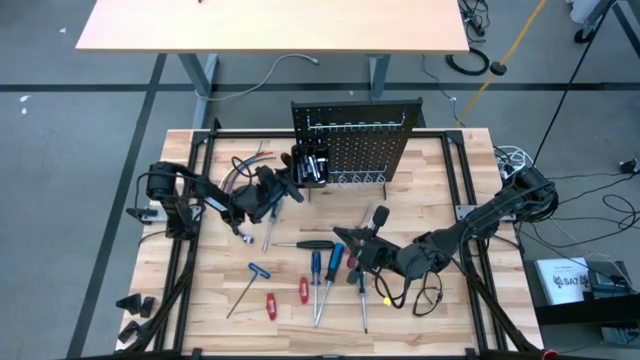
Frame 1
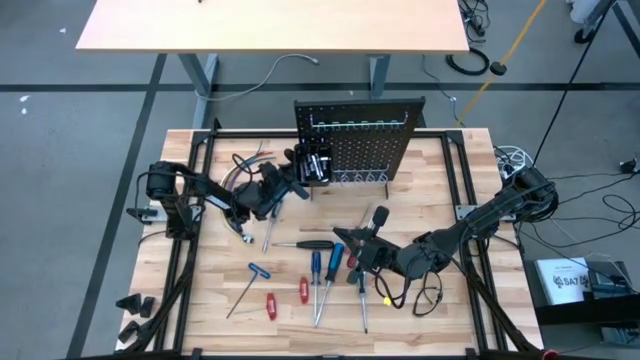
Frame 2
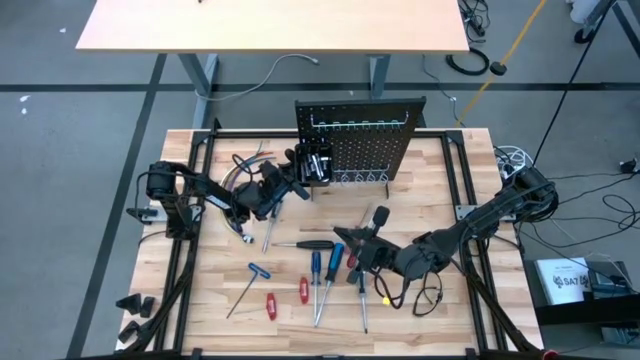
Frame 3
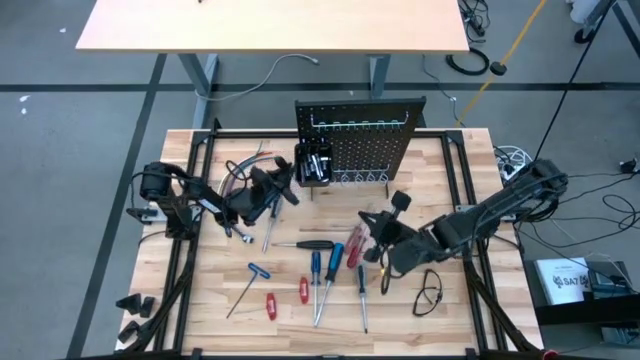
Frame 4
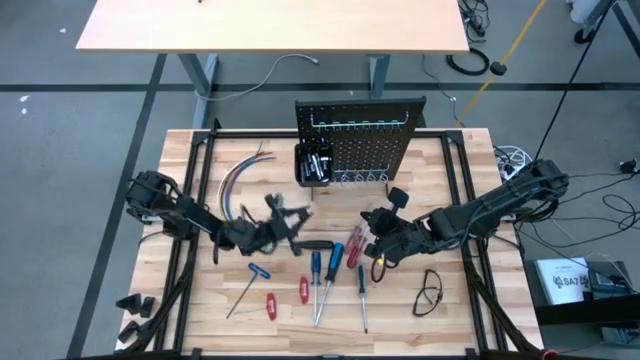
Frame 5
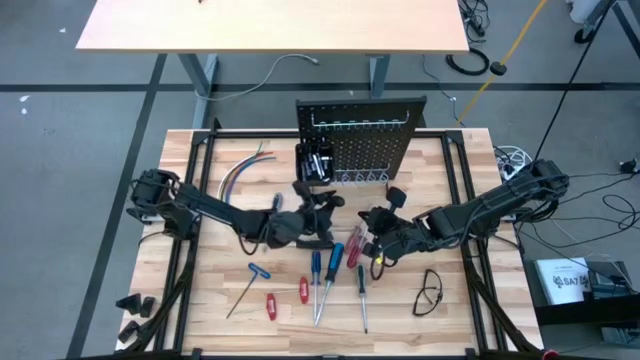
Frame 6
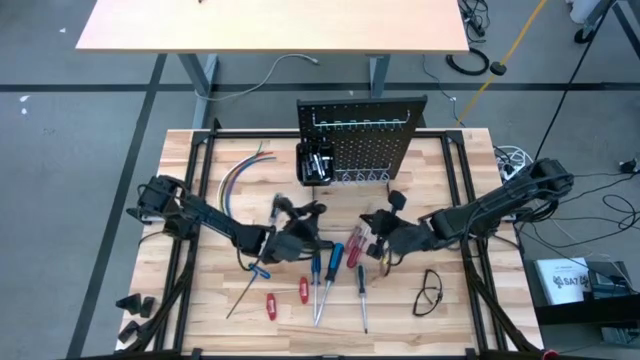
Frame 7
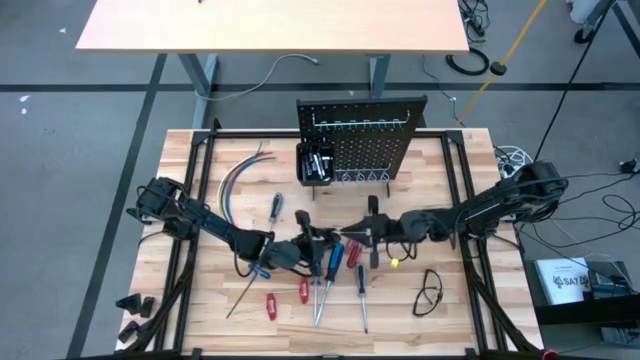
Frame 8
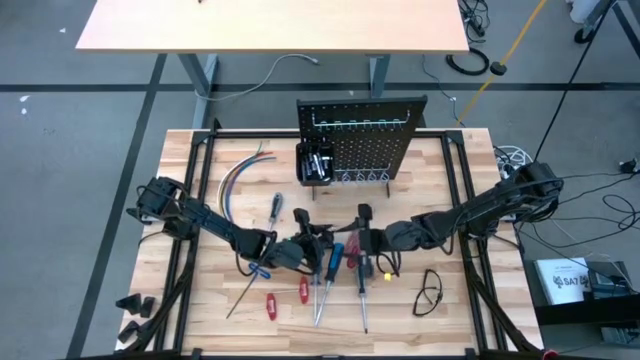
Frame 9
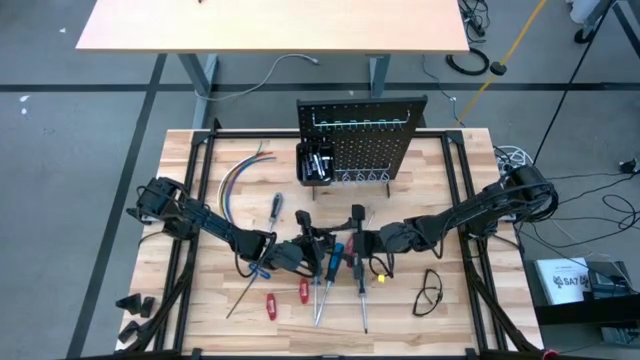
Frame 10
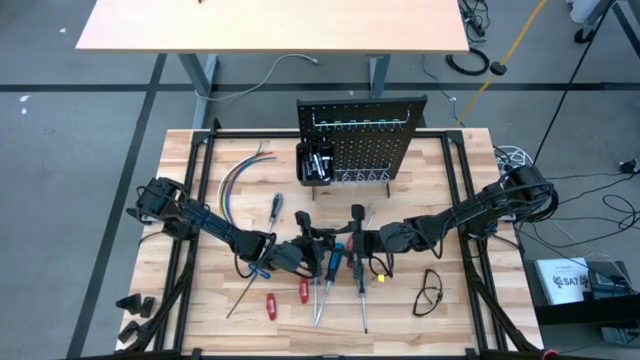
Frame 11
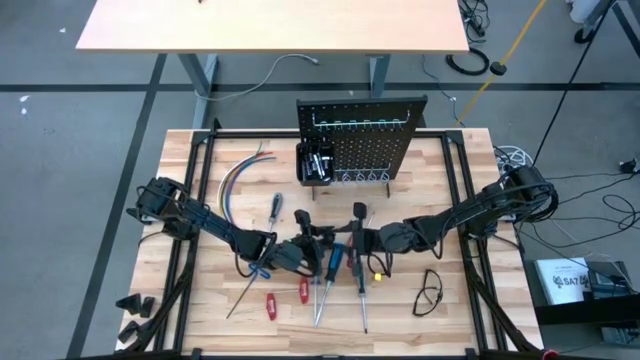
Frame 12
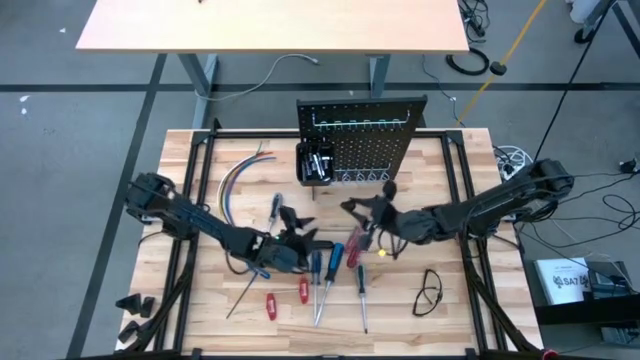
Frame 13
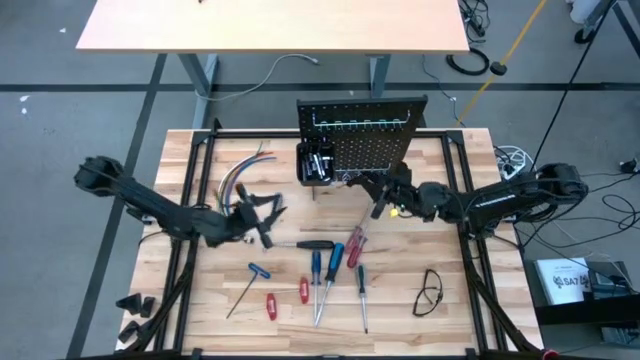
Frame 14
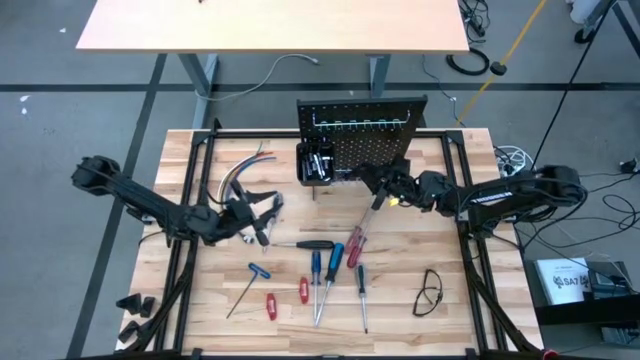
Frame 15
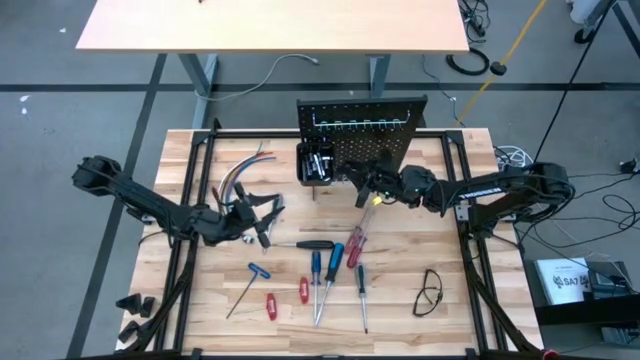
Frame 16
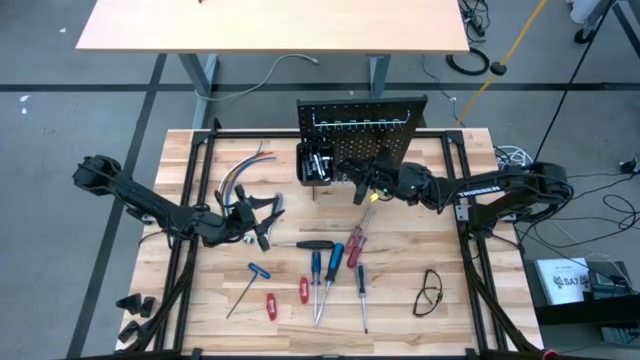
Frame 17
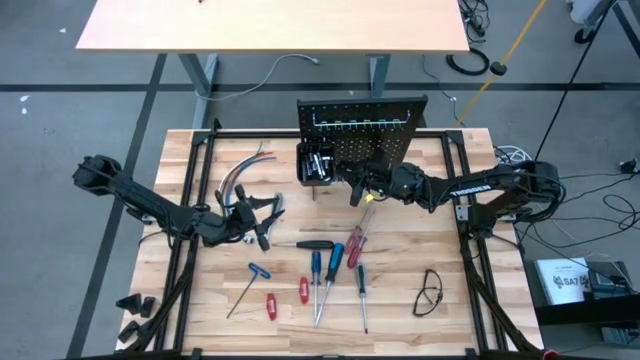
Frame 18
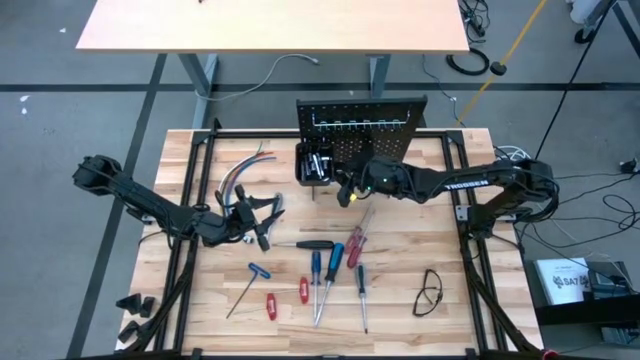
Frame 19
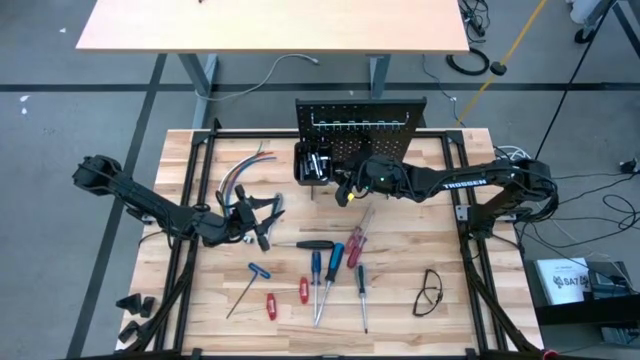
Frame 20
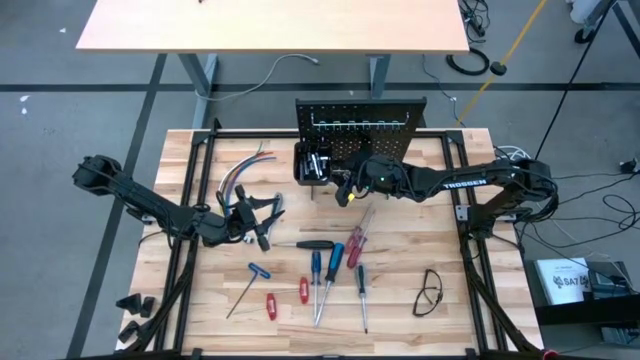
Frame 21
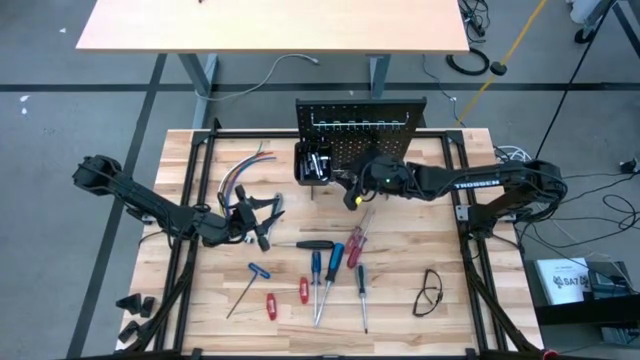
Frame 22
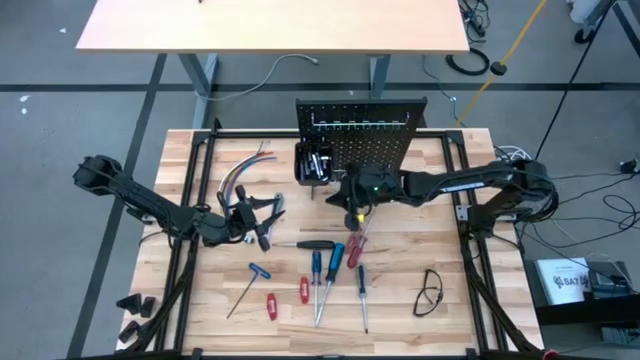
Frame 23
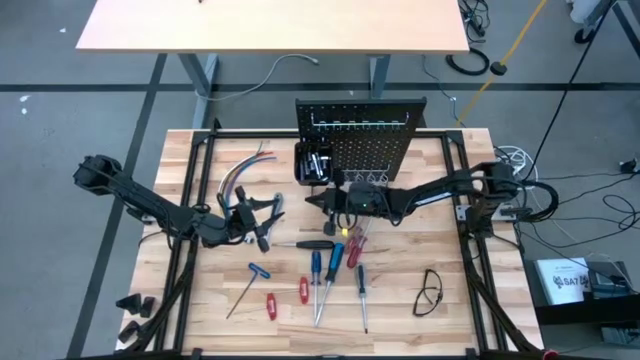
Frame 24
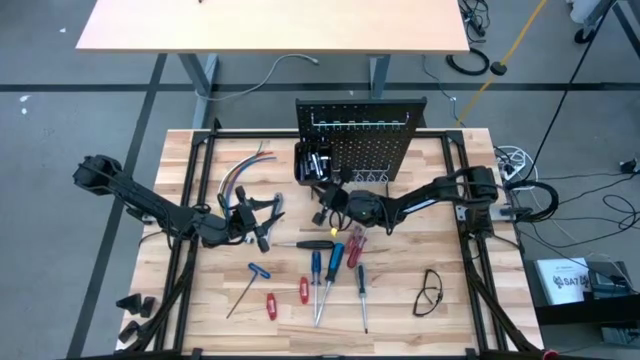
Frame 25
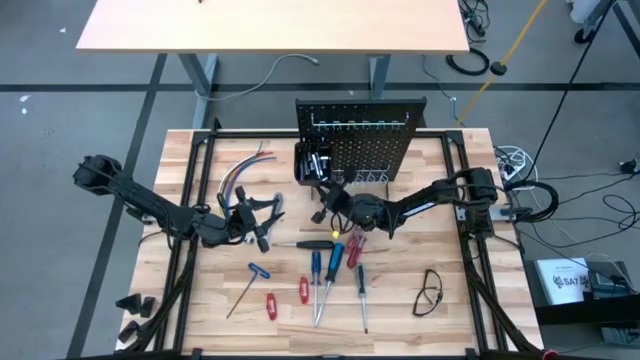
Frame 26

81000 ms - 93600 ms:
Task: Hang tools onto peg board
Hang the black screwdriver on the peg board

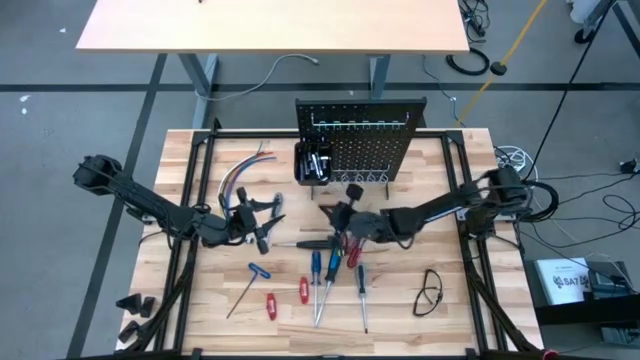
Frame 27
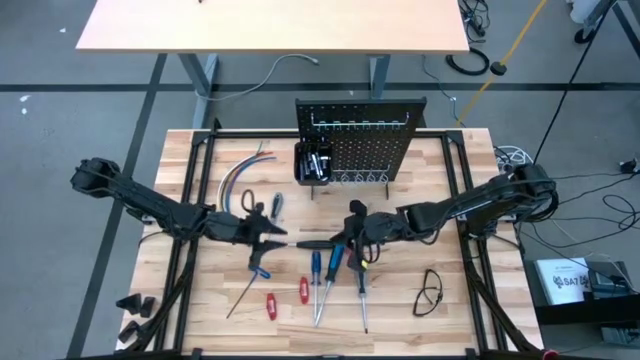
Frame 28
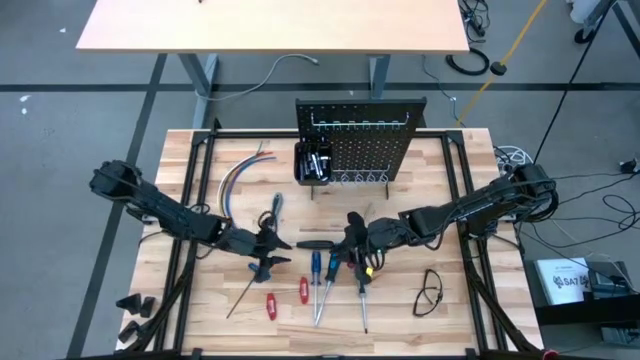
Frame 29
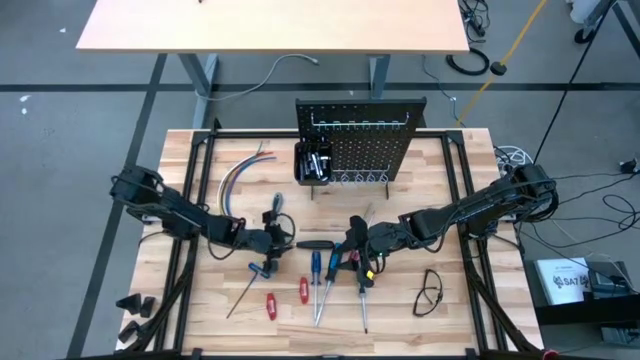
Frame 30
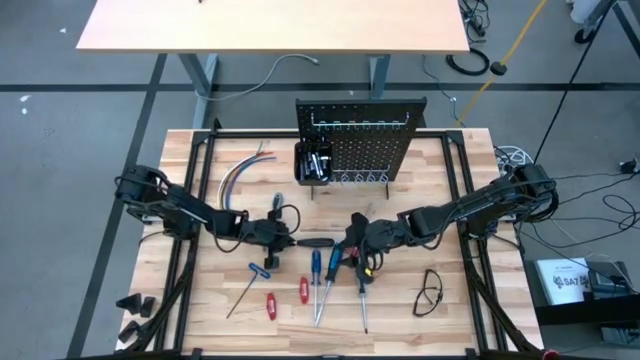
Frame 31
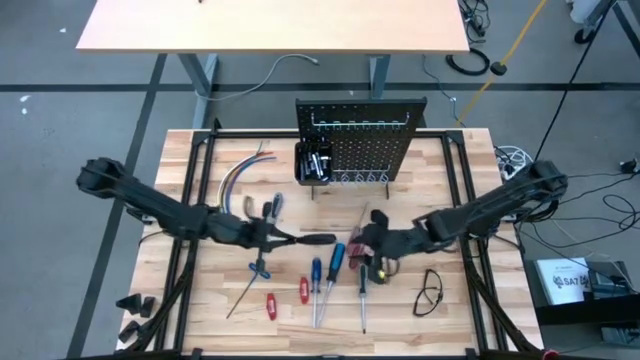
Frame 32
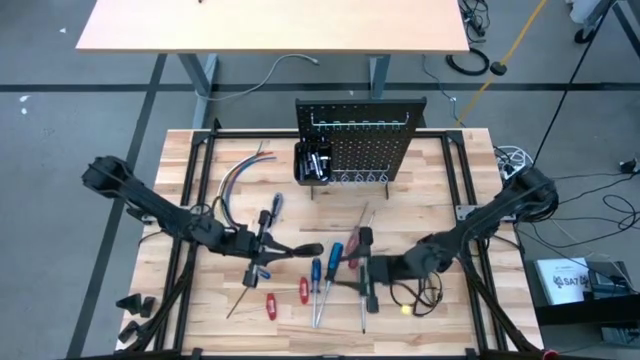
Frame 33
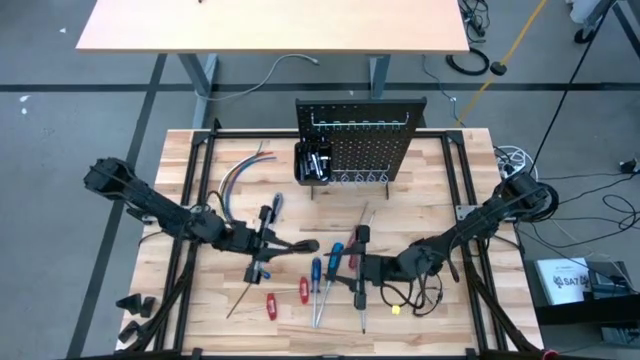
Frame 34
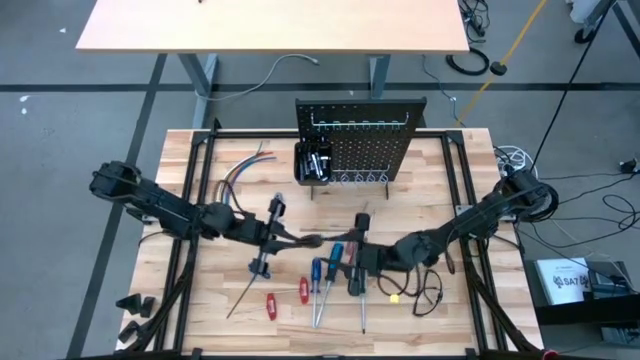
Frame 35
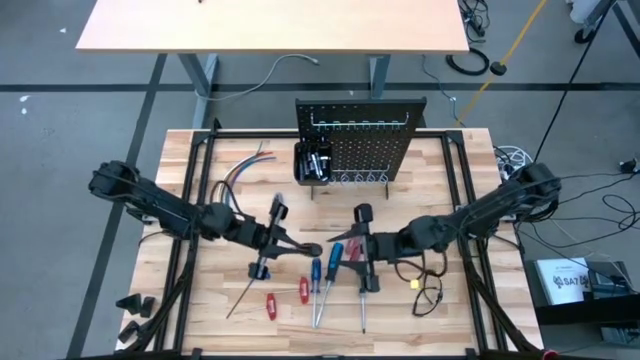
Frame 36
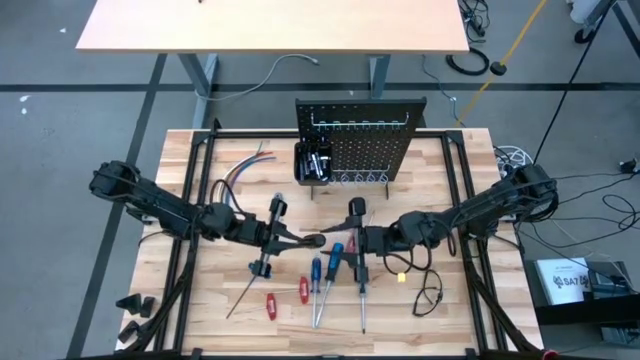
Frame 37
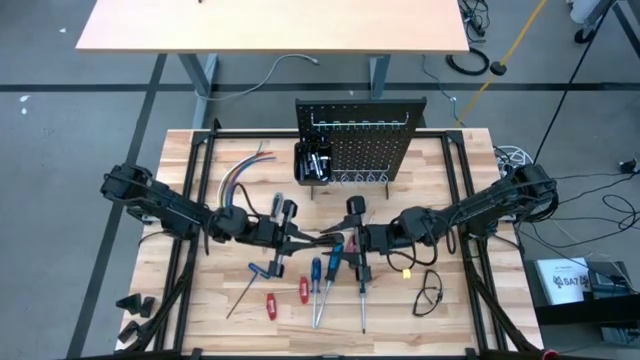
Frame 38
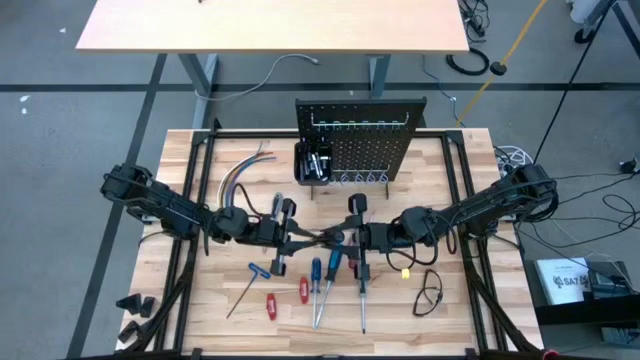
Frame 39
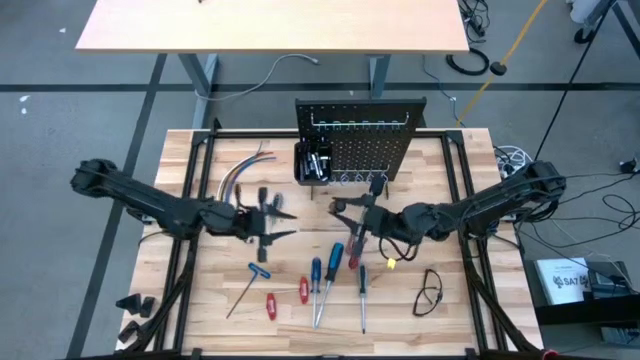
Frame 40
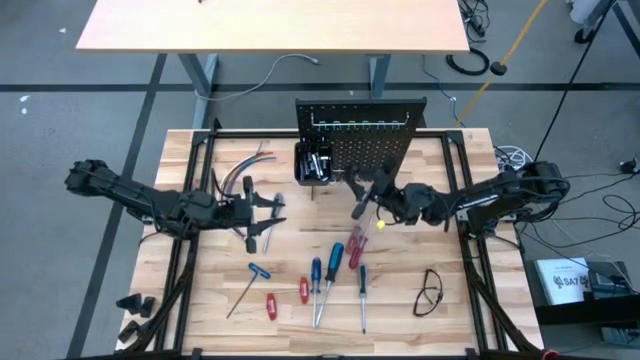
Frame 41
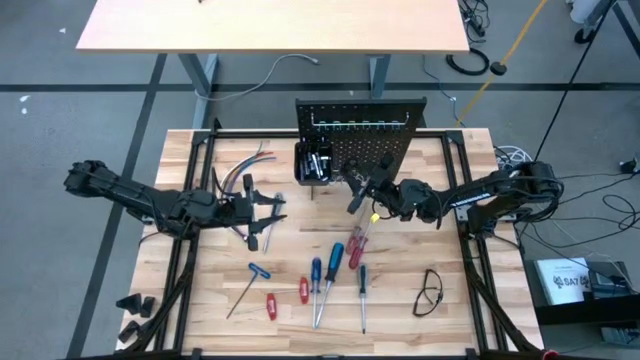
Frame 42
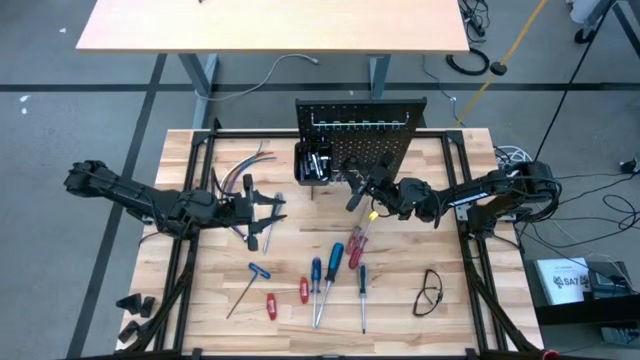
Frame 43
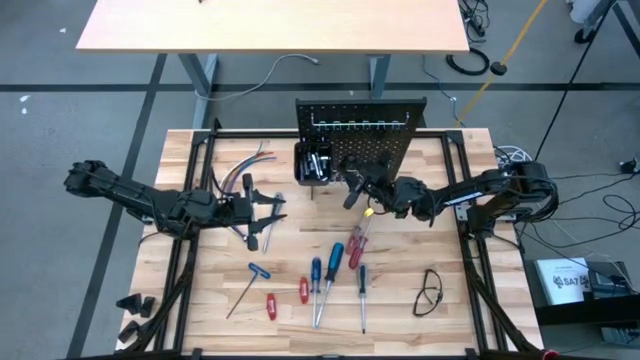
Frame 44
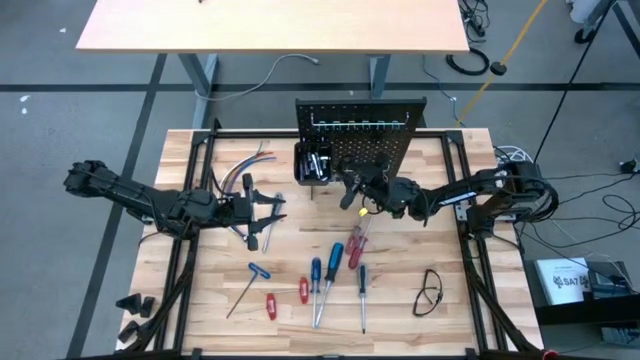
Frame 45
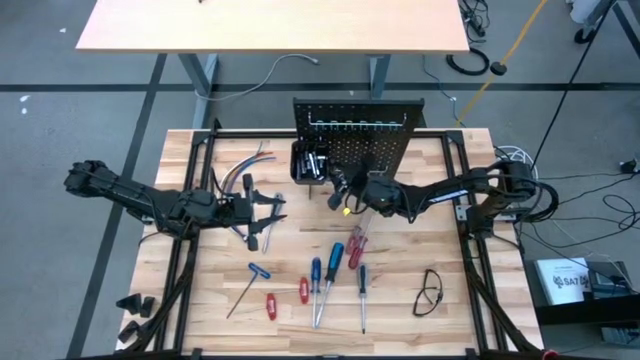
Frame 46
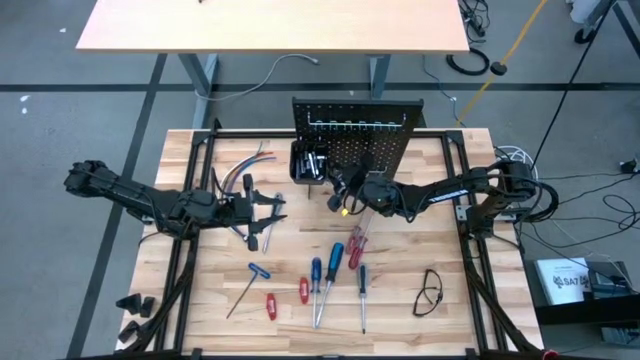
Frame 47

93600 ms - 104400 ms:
Hang the black nut driver on the peg board
